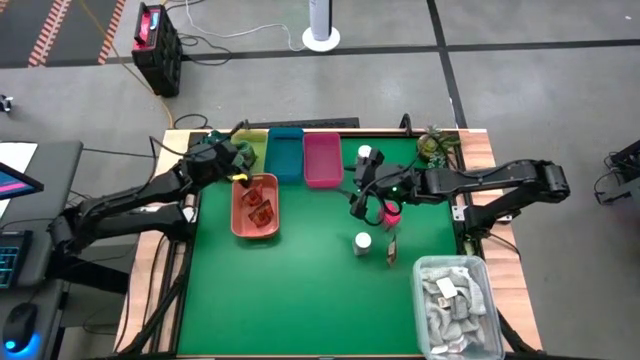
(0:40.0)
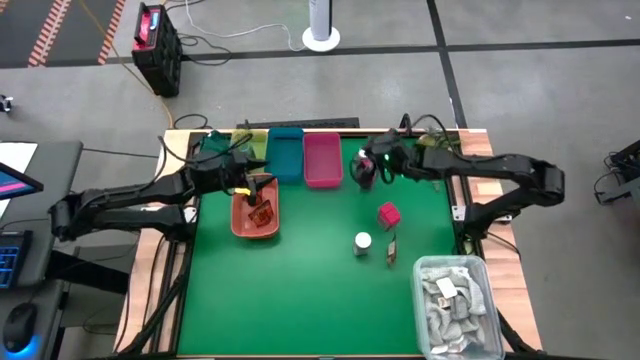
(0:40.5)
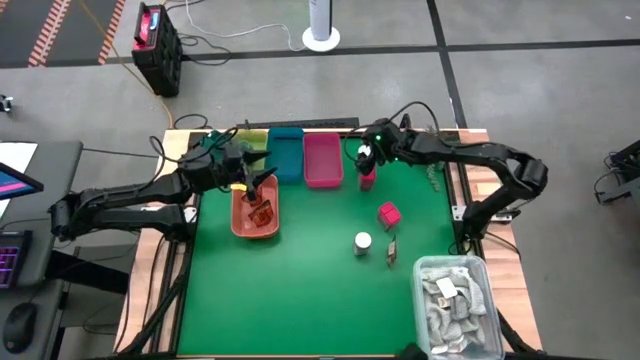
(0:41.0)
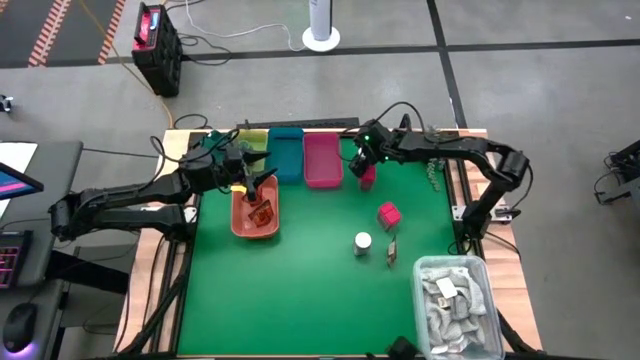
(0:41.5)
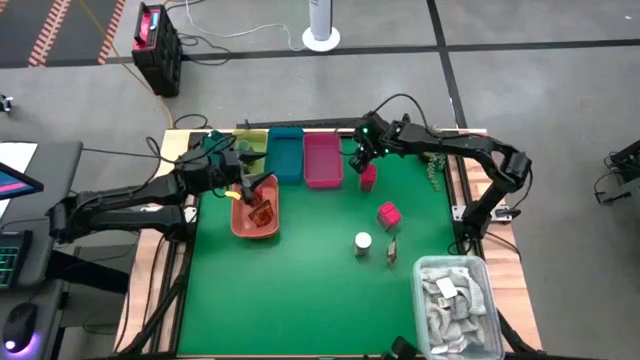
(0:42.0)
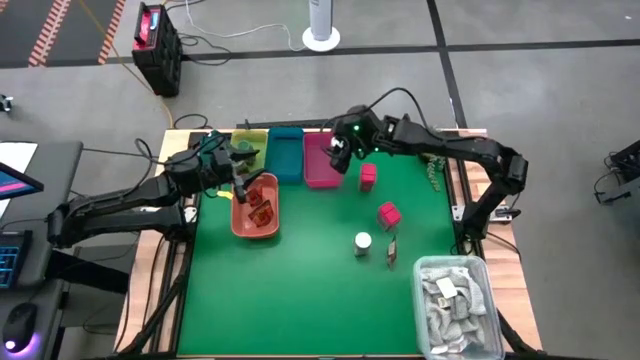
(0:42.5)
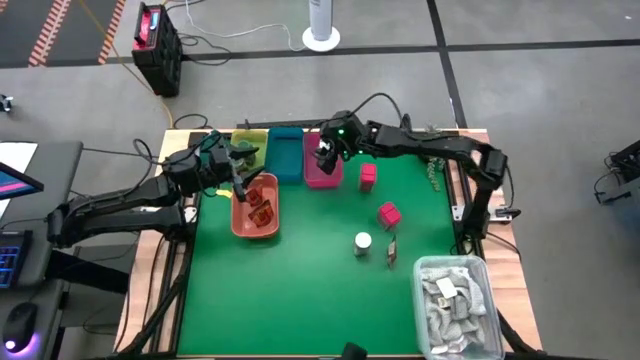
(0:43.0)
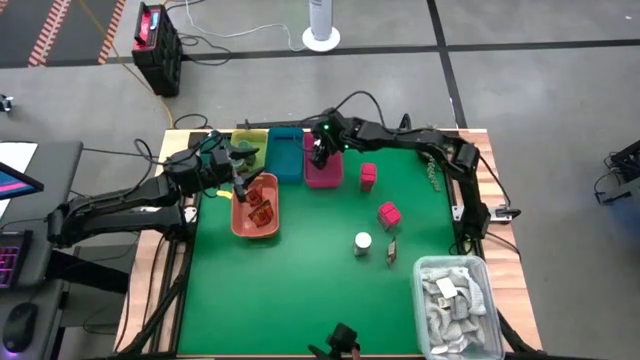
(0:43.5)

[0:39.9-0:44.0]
Task: Sort spices by type
Put the top white seasoning bottle into the red bin

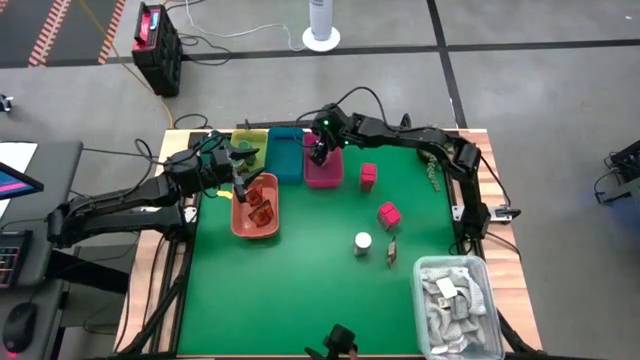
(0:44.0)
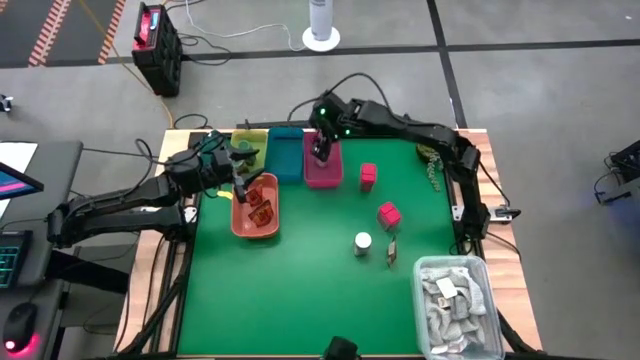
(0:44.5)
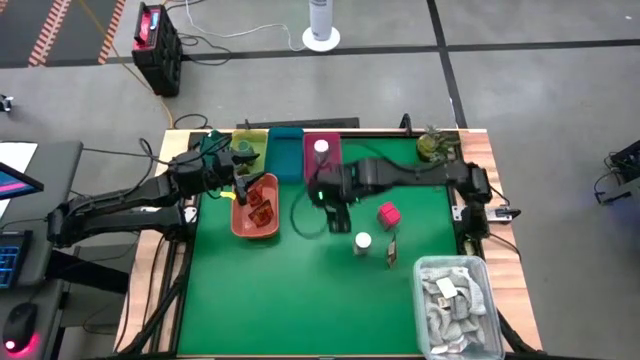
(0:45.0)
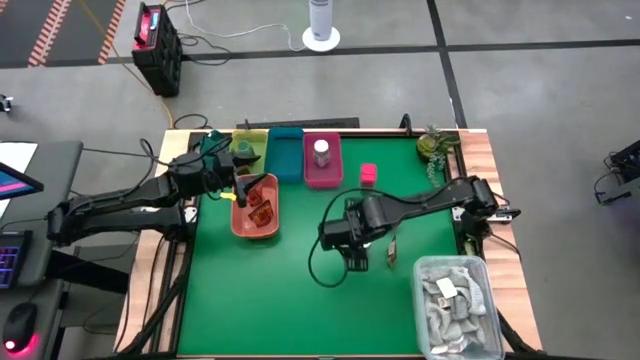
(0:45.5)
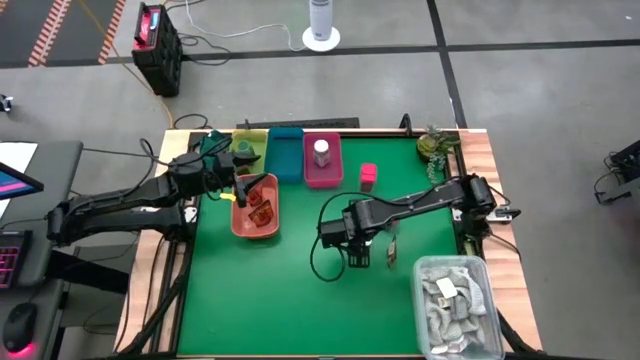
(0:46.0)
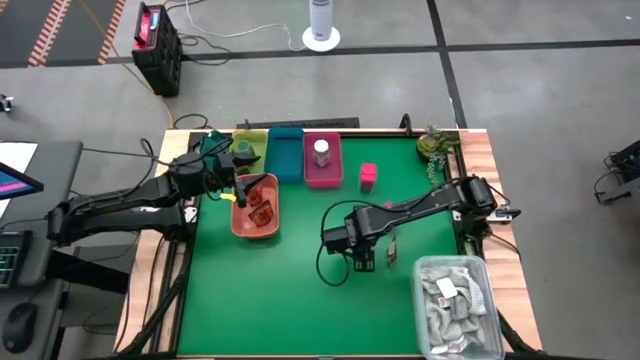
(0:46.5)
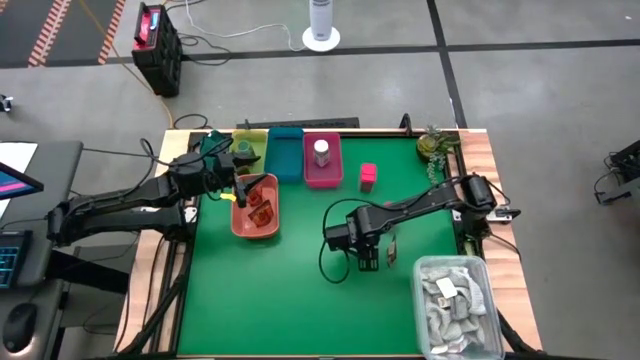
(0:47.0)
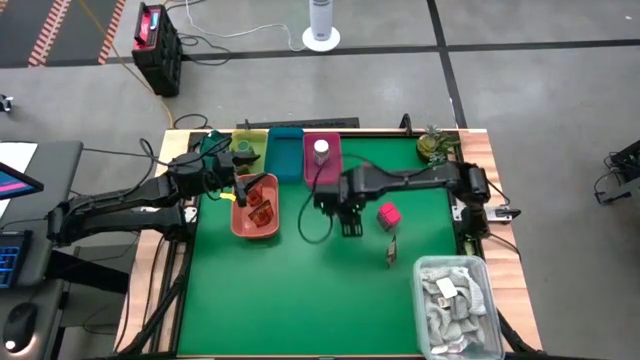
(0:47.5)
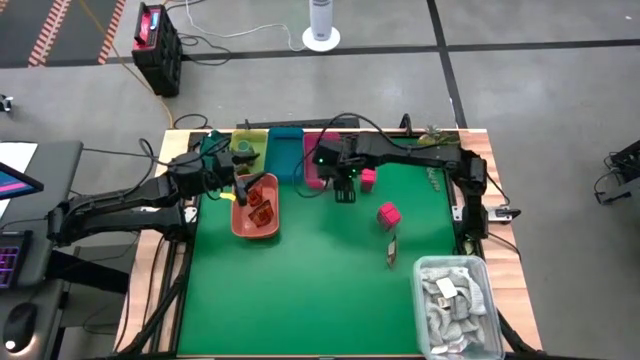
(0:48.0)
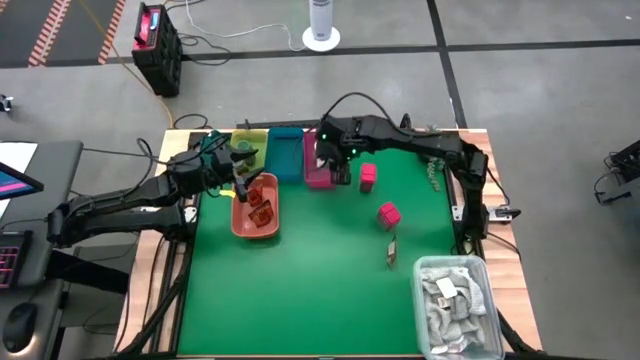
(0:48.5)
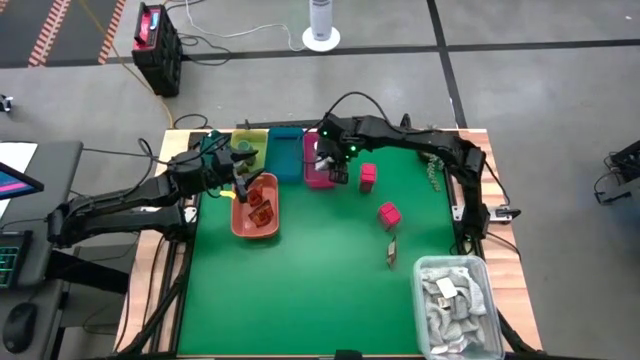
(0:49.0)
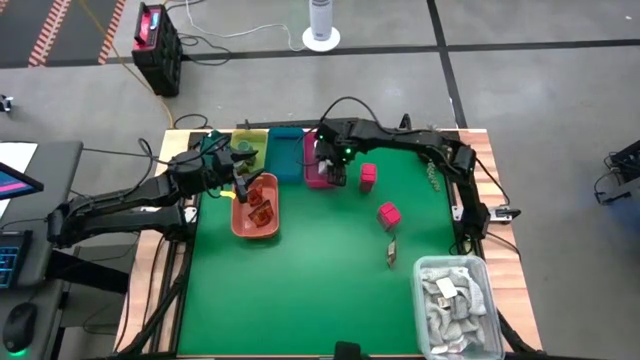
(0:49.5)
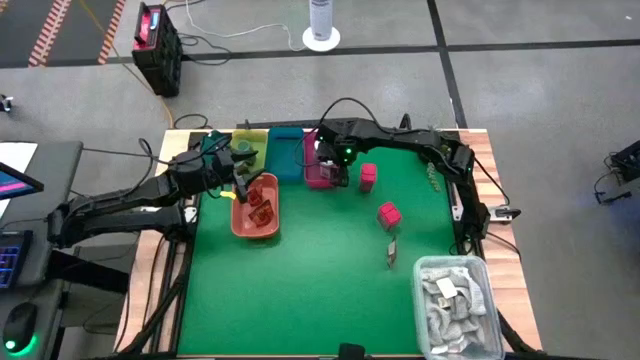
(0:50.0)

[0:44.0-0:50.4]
Put the white seasoning bottle into the red bin

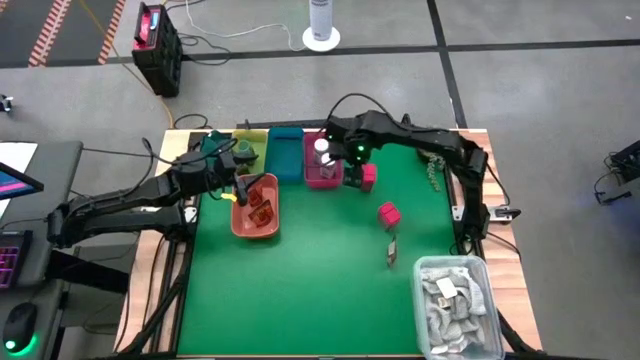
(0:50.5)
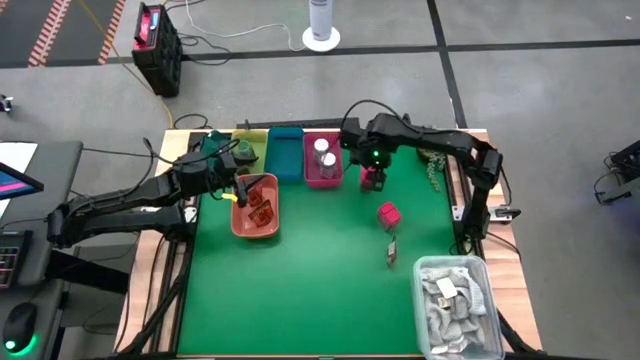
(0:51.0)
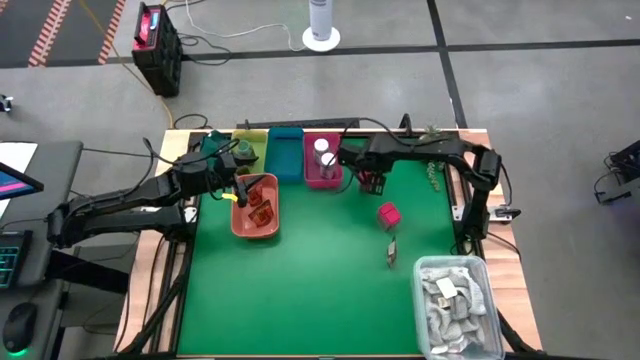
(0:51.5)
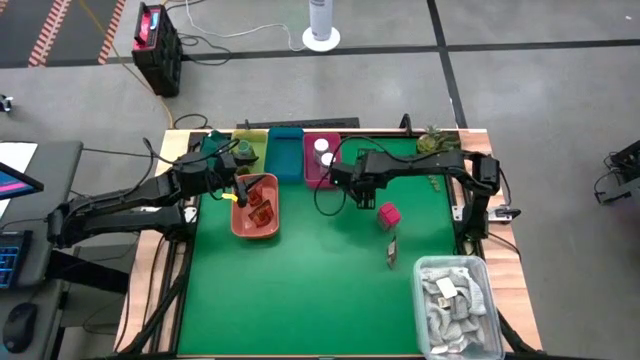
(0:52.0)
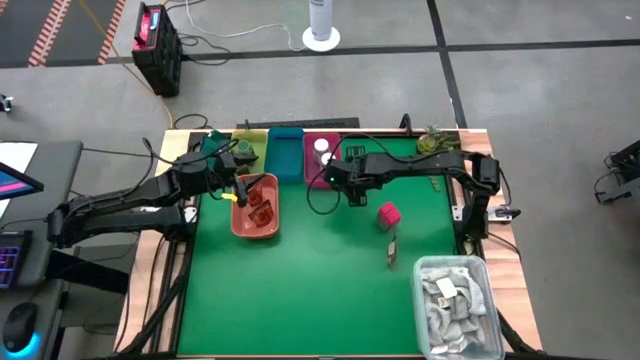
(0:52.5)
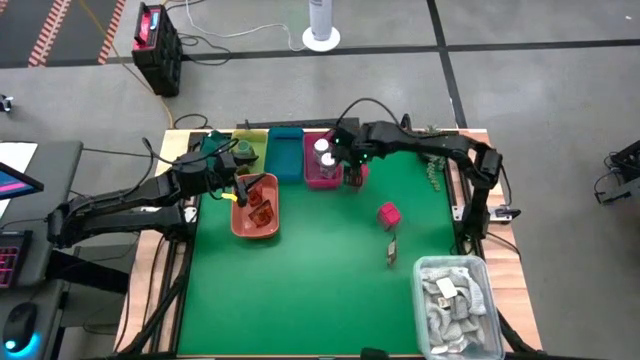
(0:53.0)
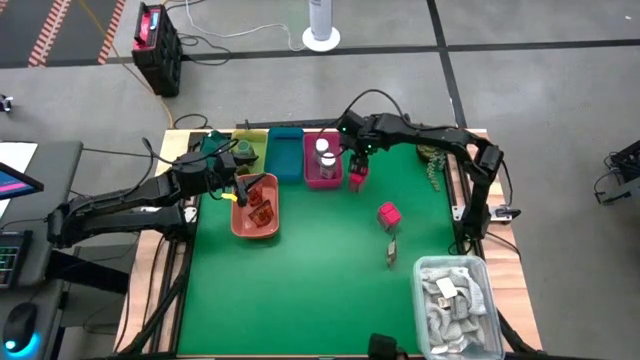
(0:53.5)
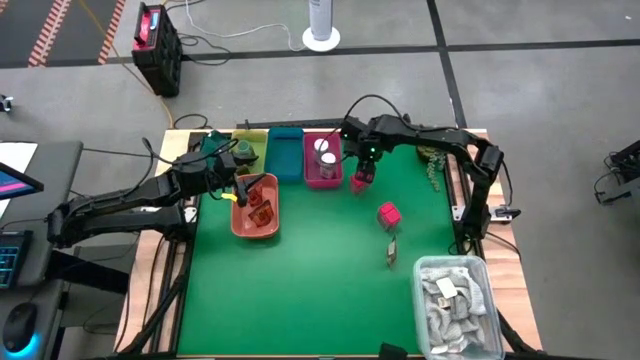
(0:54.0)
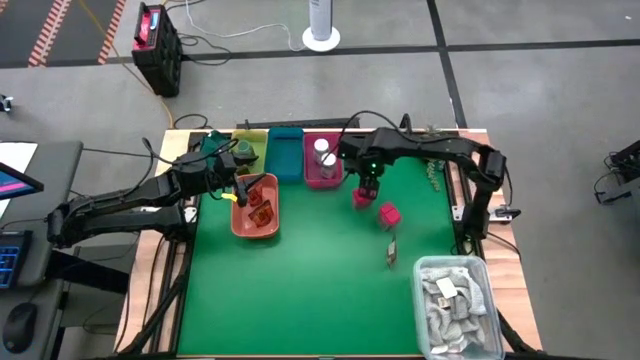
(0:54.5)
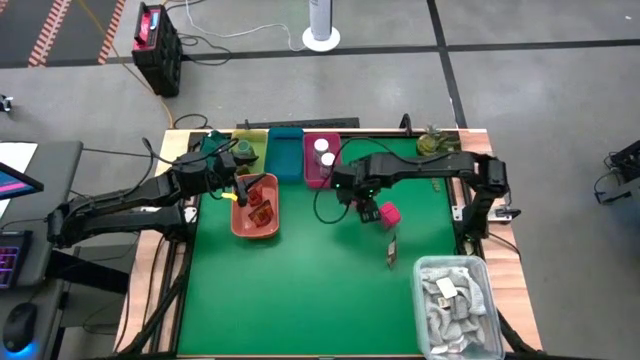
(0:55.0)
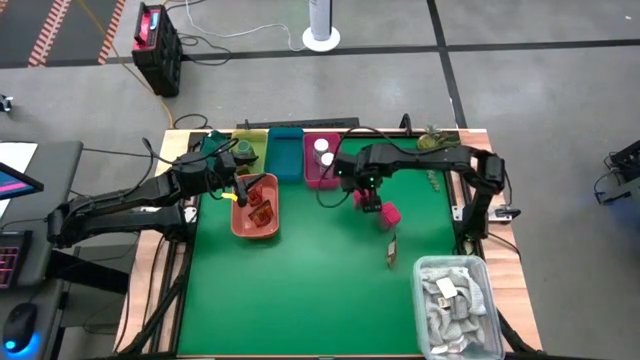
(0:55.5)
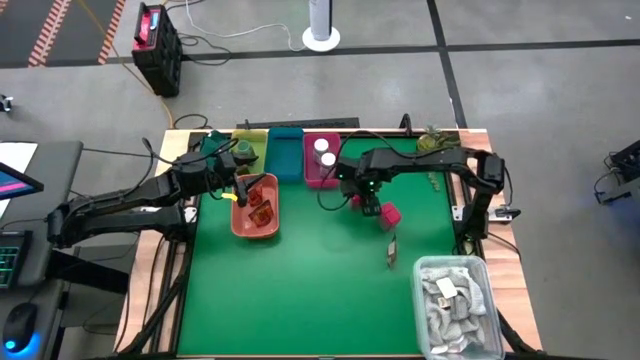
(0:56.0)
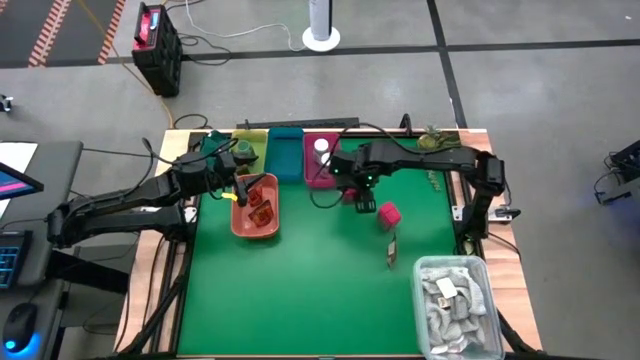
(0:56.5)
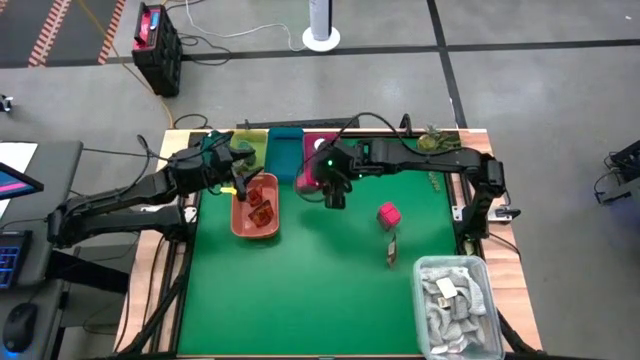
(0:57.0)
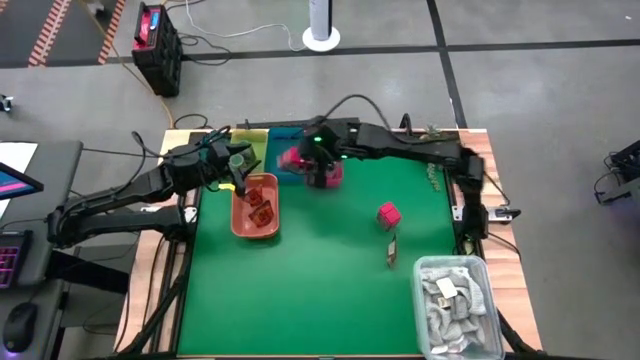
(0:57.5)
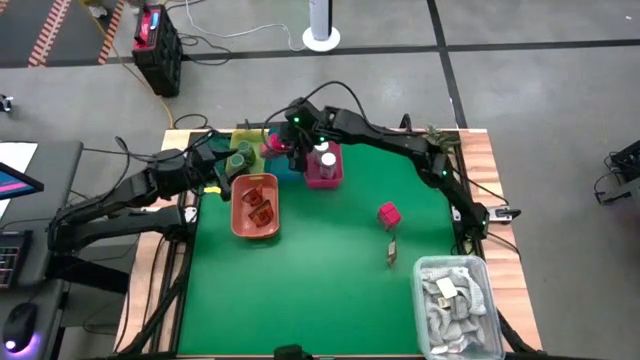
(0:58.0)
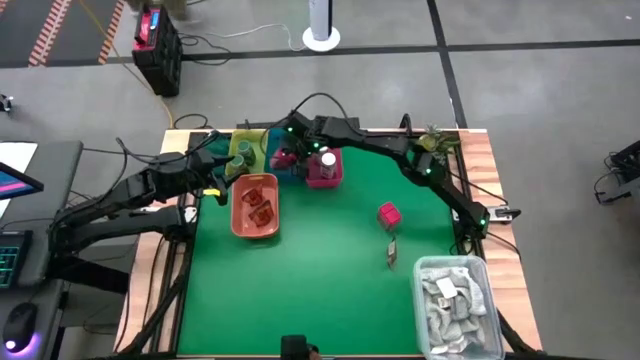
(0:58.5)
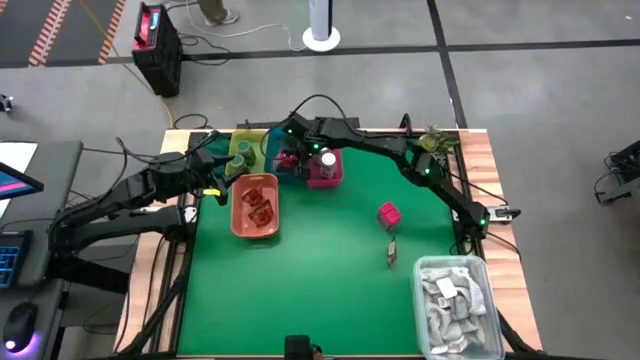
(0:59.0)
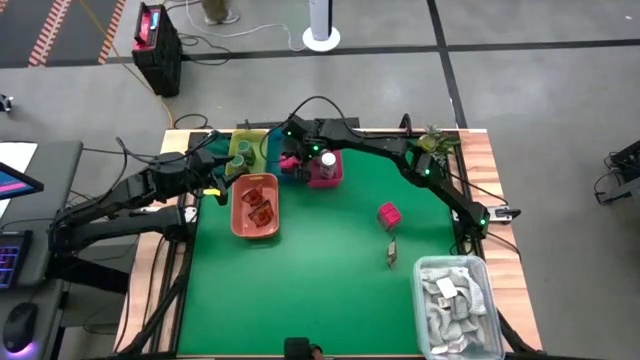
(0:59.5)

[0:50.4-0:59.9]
Put the top red seasoning can into the blue bin

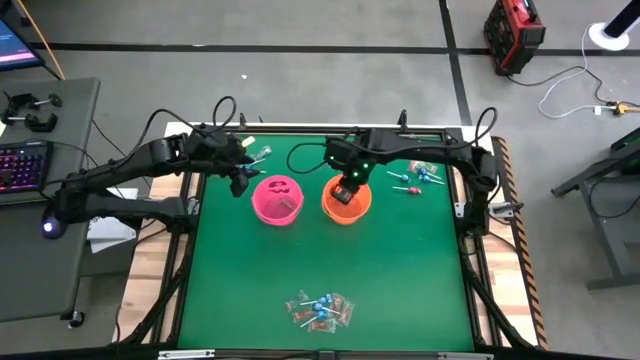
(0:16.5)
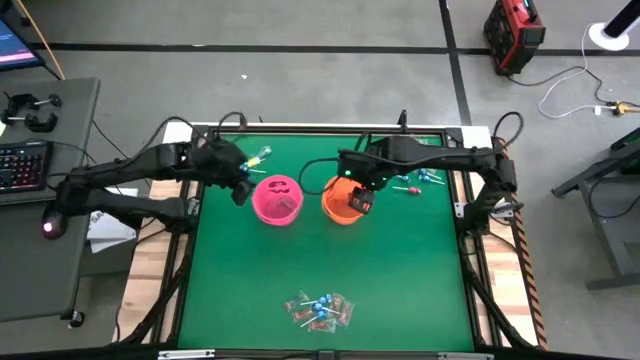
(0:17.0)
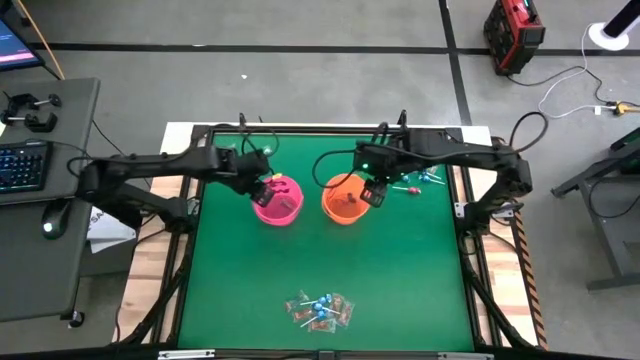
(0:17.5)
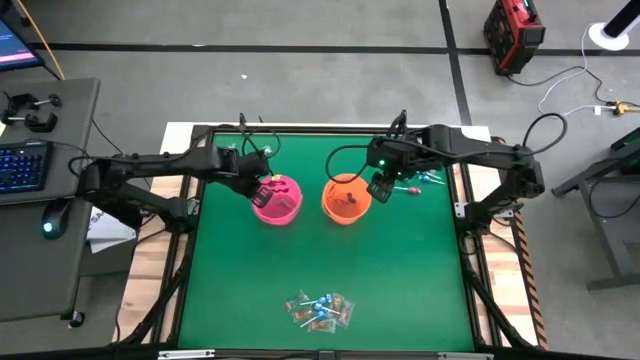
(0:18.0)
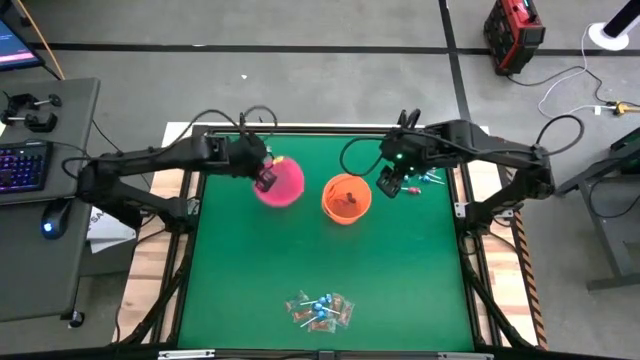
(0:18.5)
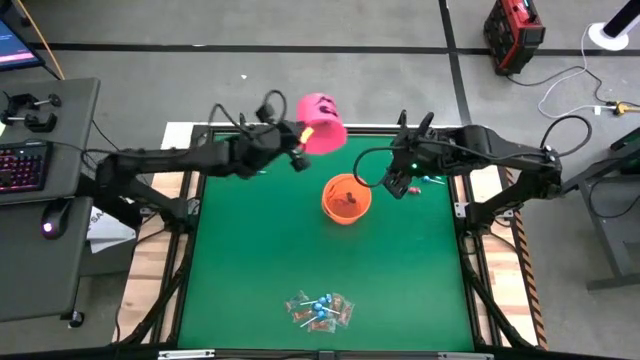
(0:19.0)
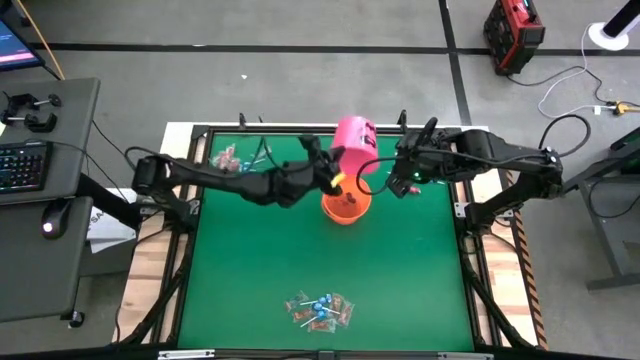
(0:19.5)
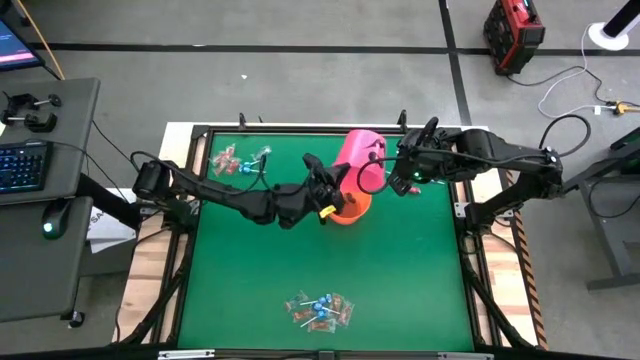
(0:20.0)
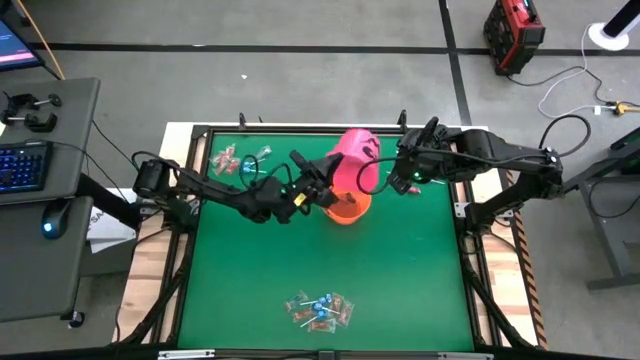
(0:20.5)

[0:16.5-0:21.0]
Task: Sort candy by brand, put in halloween buckets
Put the green gummy from the pink bucket to the orange bucket
